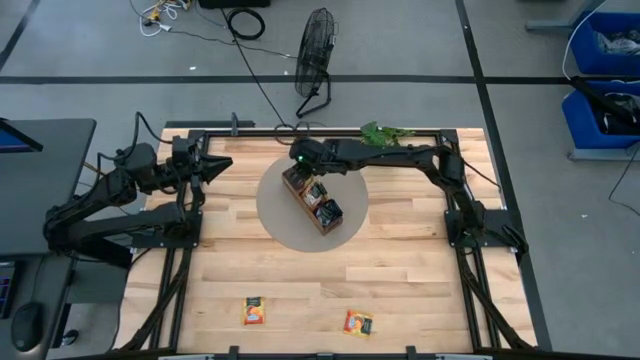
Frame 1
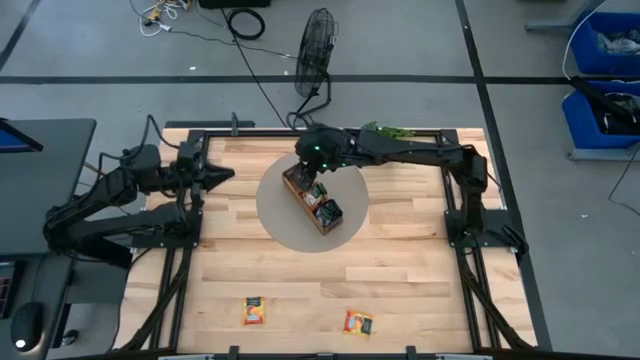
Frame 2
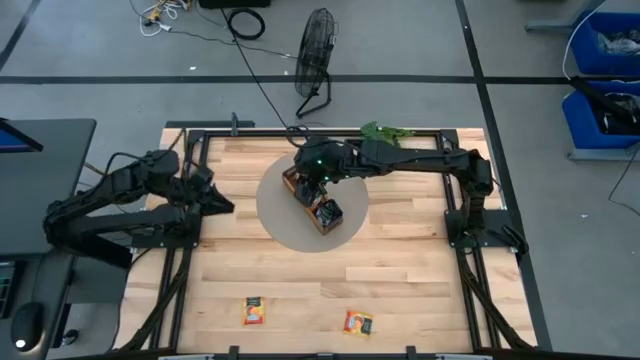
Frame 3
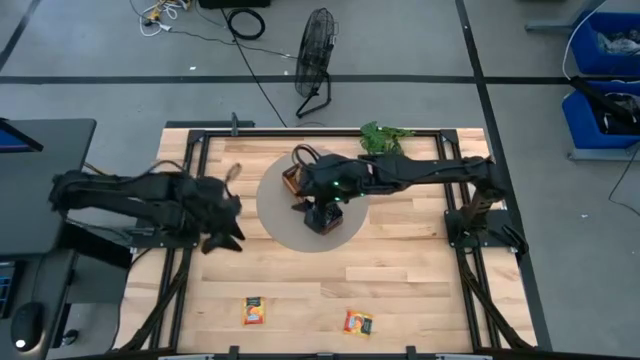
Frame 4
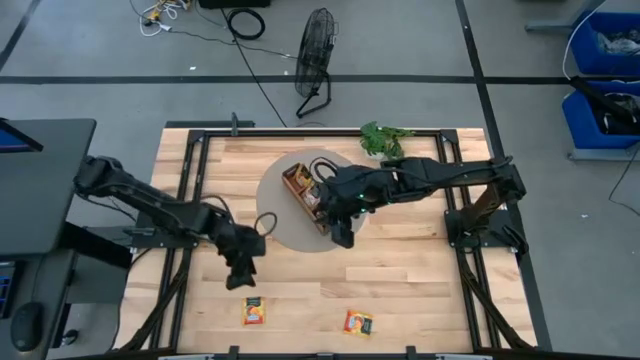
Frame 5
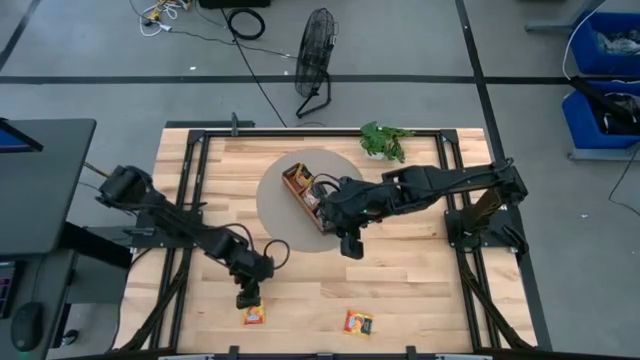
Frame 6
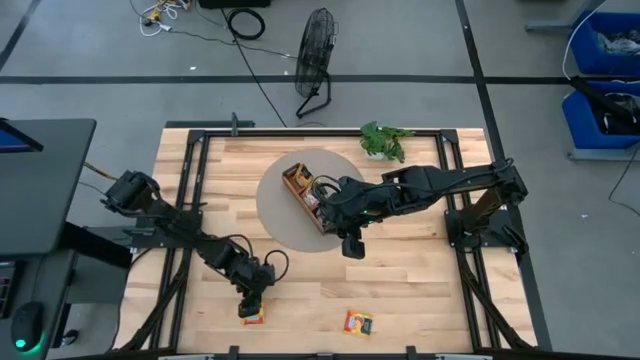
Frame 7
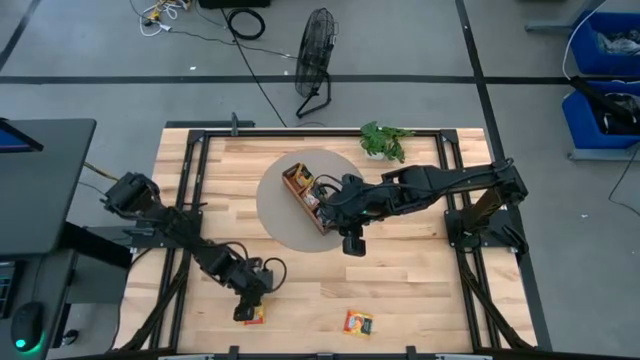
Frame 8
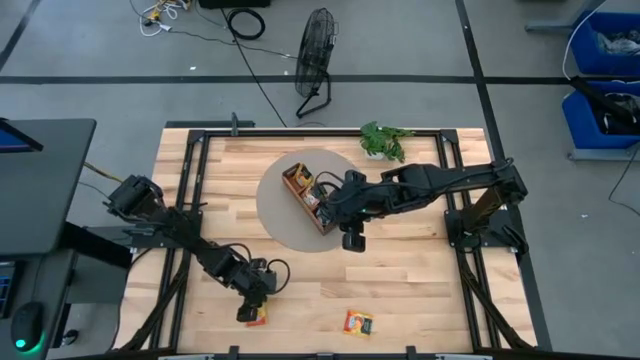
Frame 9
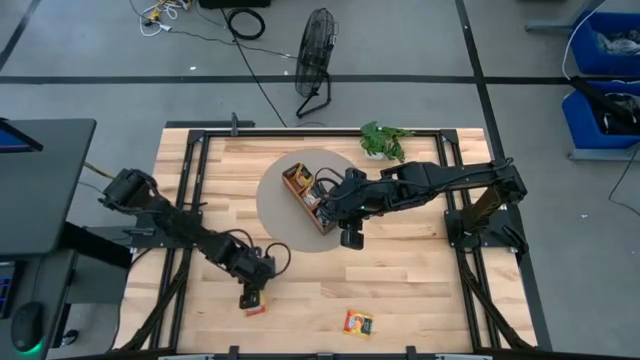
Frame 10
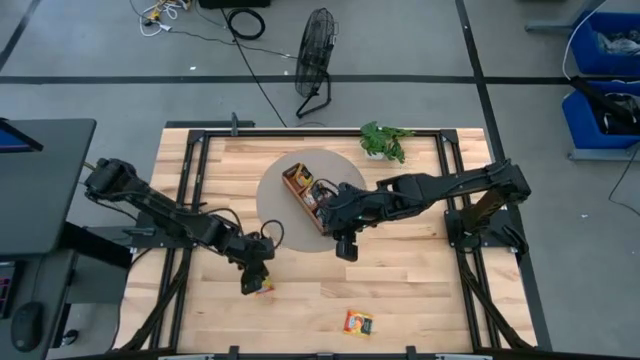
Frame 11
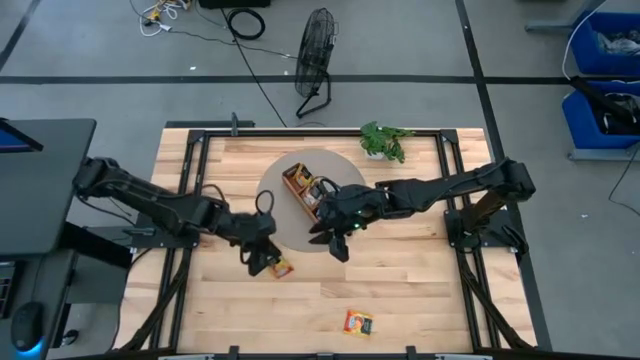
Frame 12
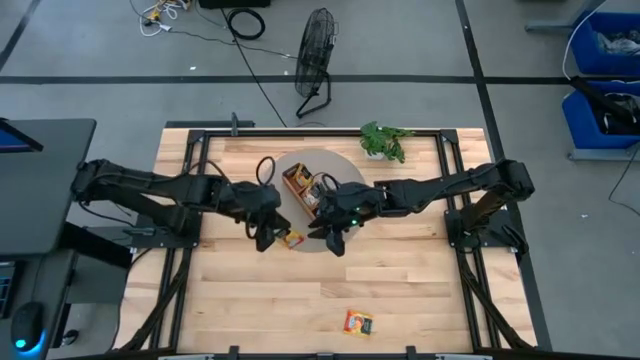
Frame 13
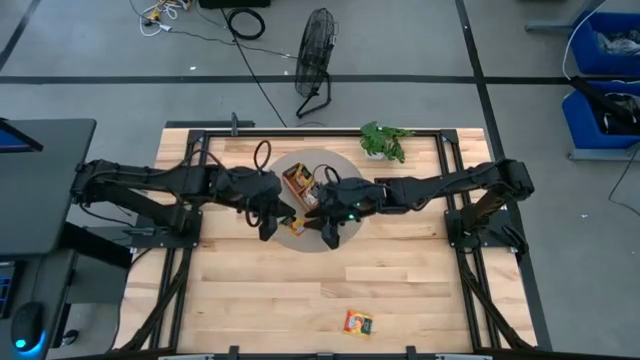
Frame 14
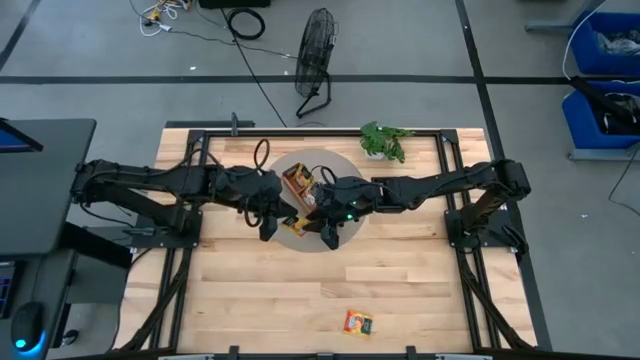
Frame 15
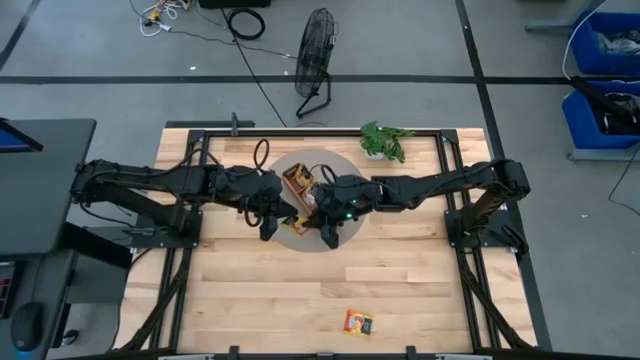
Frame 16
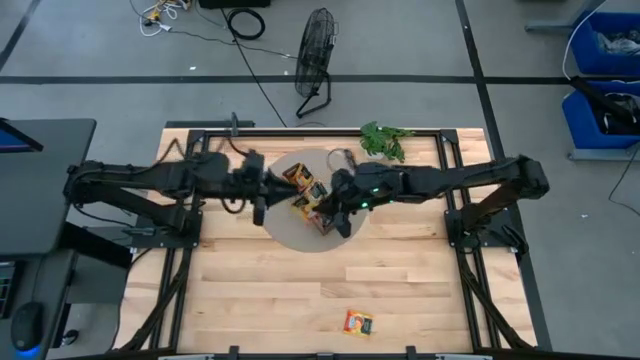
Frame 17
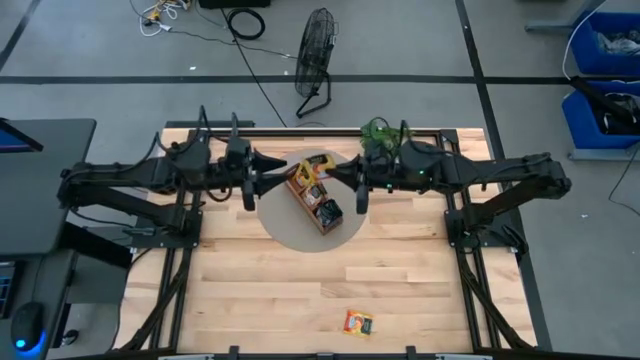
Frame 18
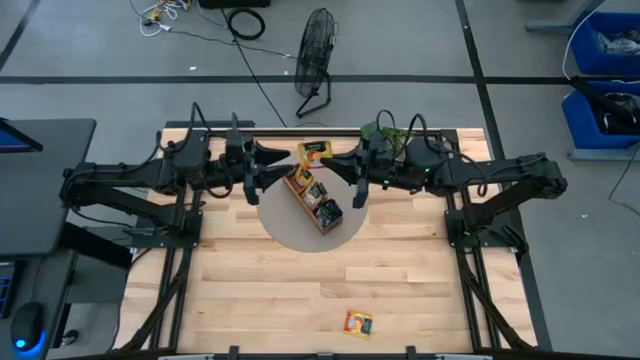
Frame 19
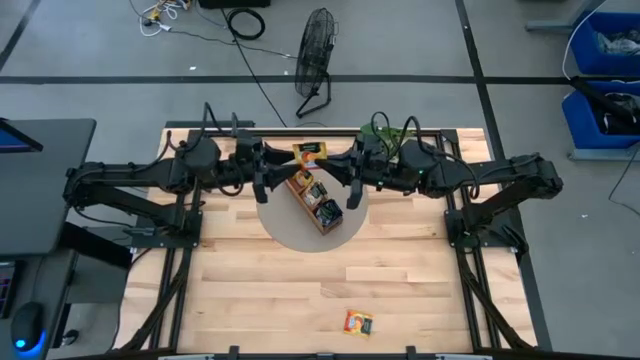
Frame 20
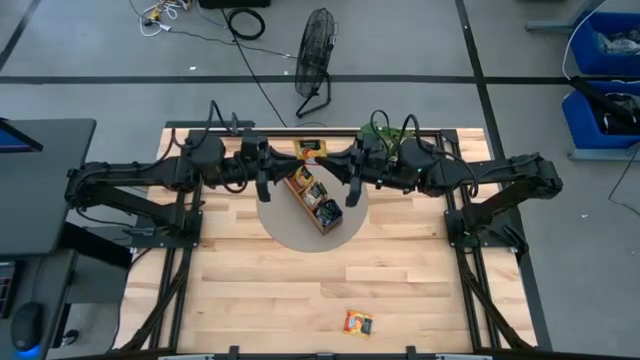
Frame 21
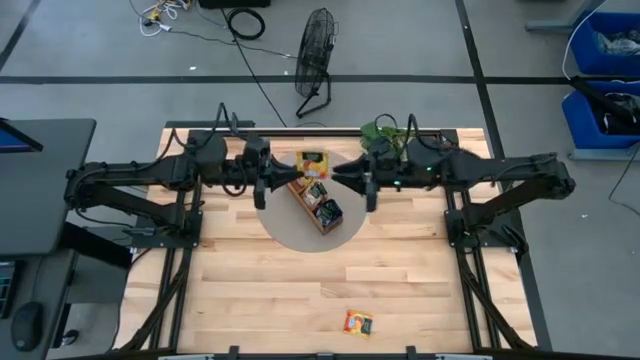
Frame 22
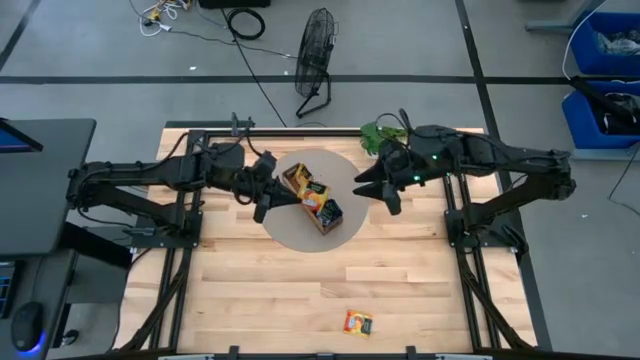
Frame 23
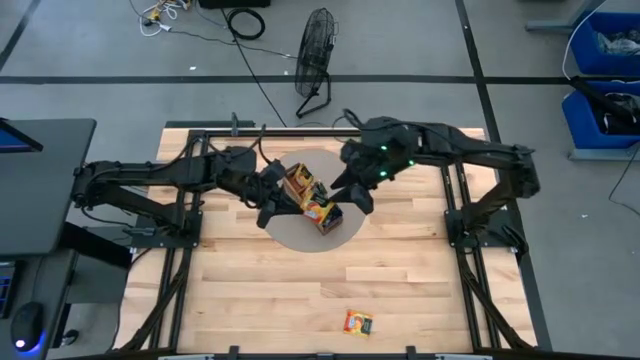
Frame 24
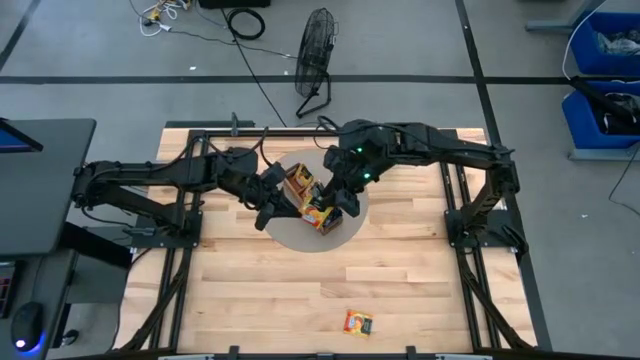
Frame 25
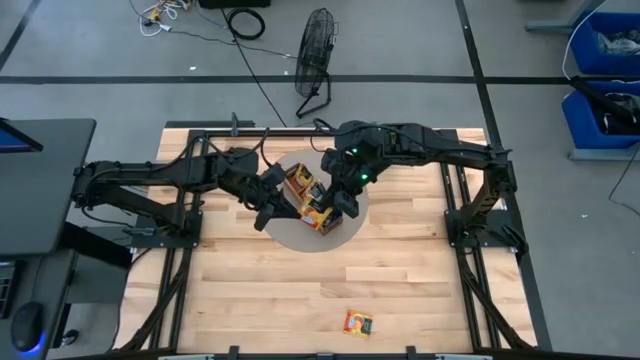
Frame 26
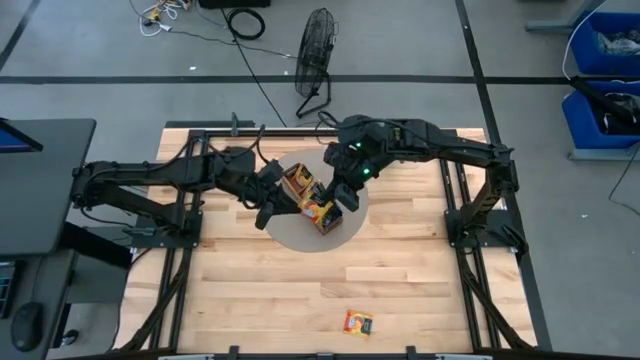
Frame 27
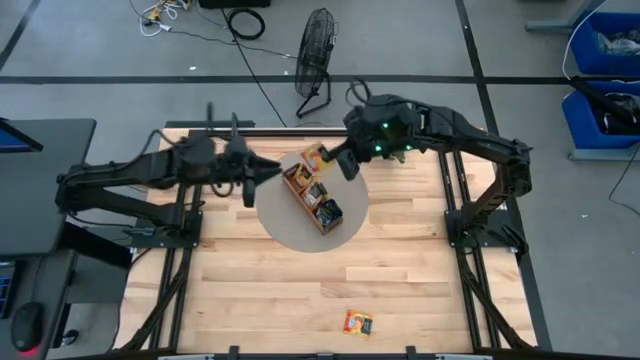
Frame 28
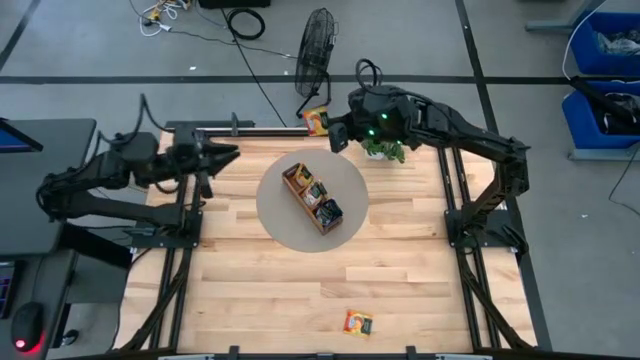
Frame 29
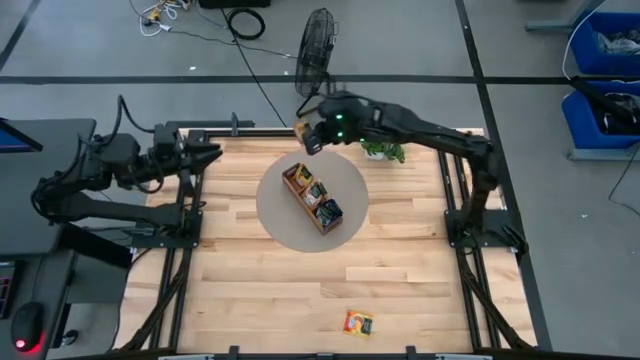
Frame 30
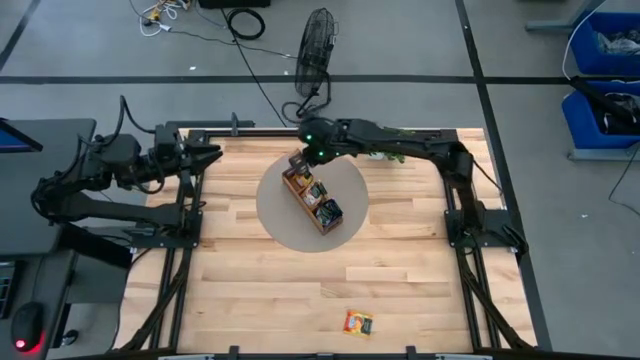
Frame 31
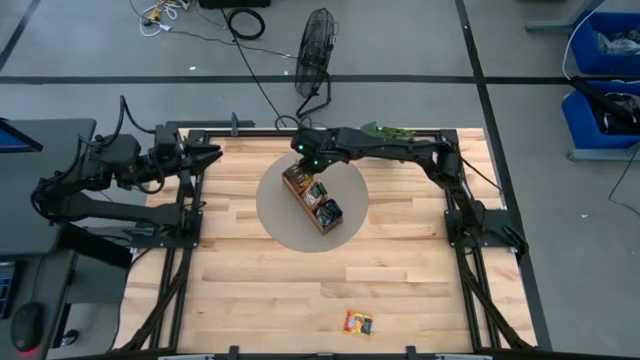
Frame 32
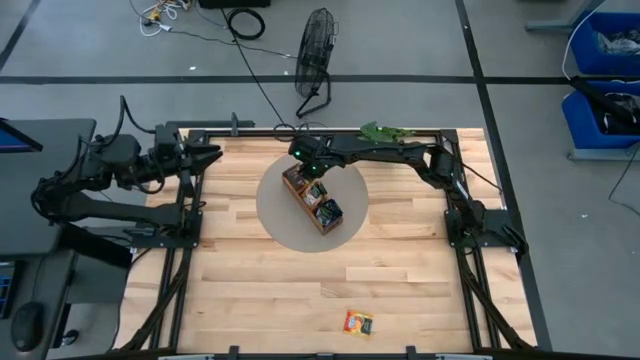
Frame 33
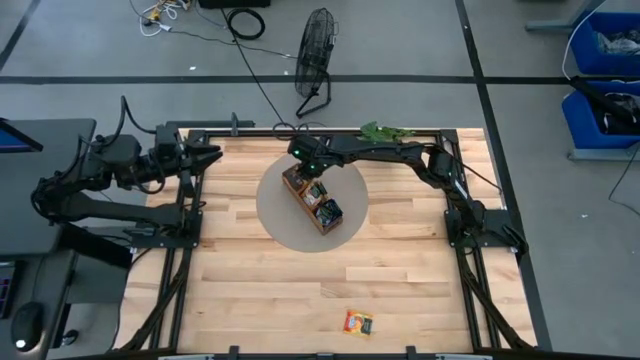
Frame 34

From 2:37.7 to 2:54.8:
Task: Pick & Place Tea
Put the yellow tea bag into the left section of the wooden organizer

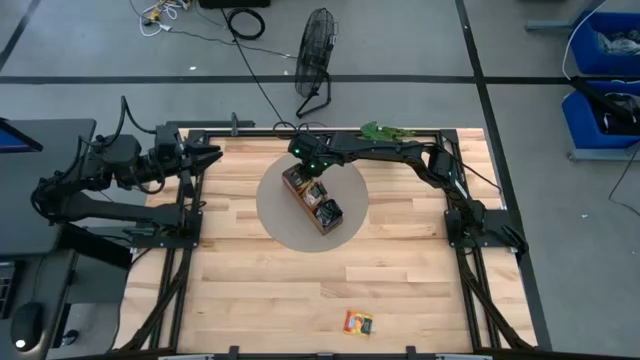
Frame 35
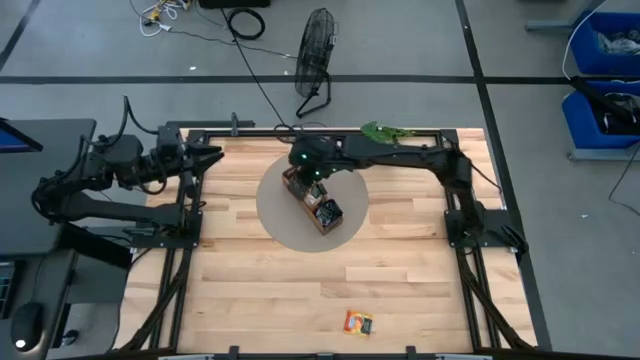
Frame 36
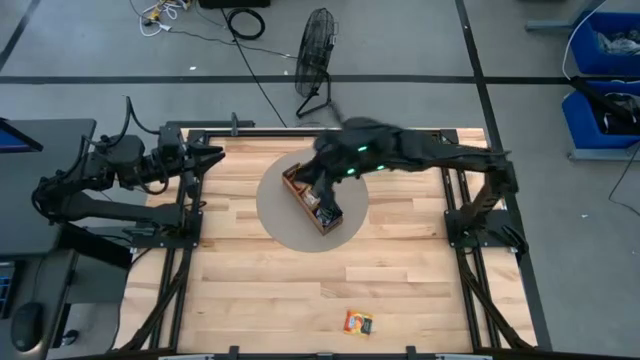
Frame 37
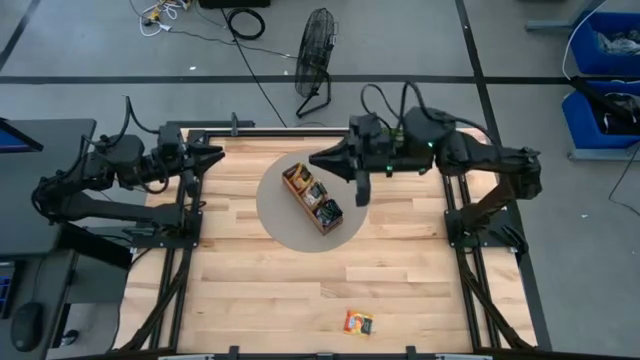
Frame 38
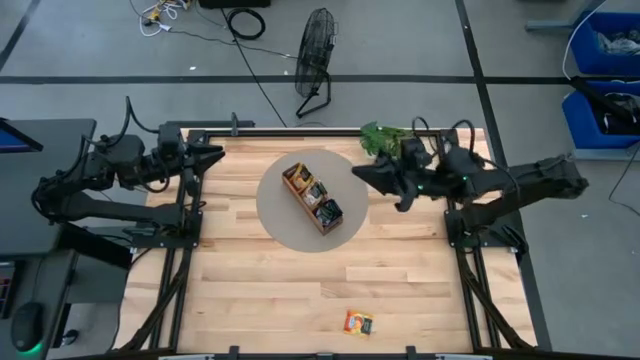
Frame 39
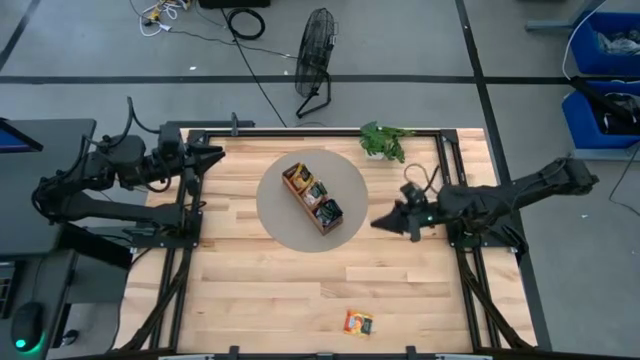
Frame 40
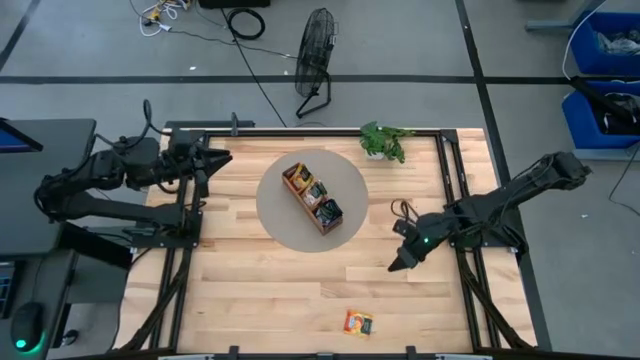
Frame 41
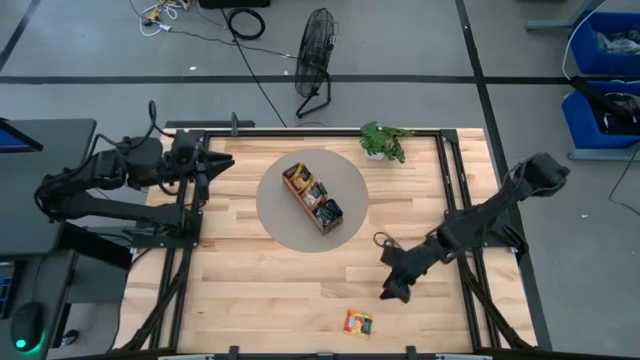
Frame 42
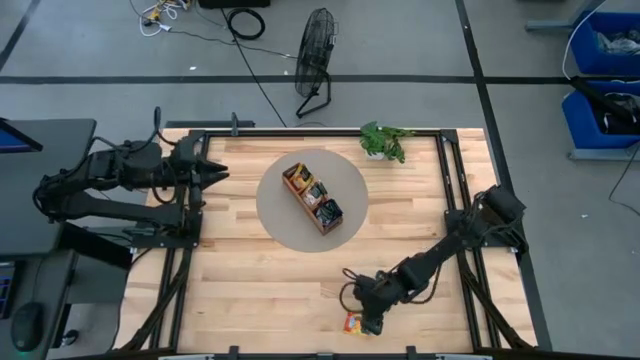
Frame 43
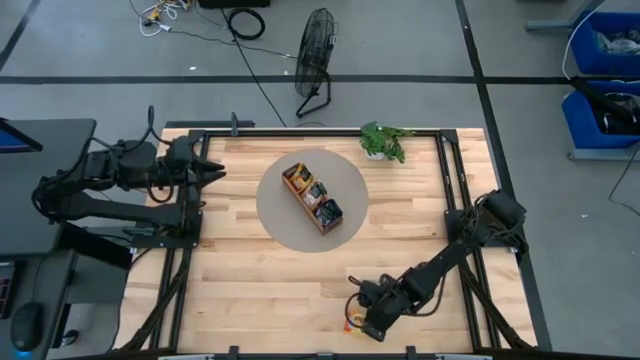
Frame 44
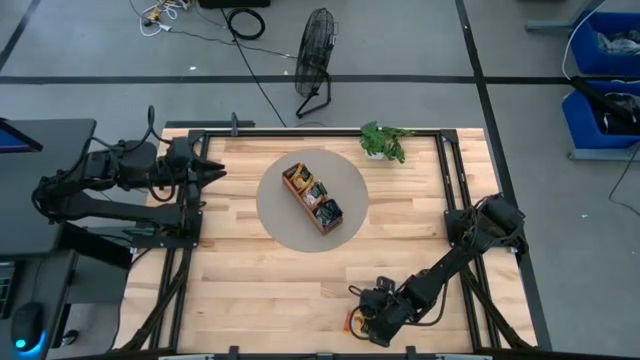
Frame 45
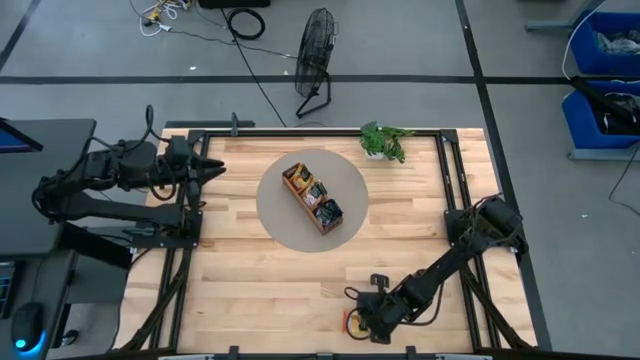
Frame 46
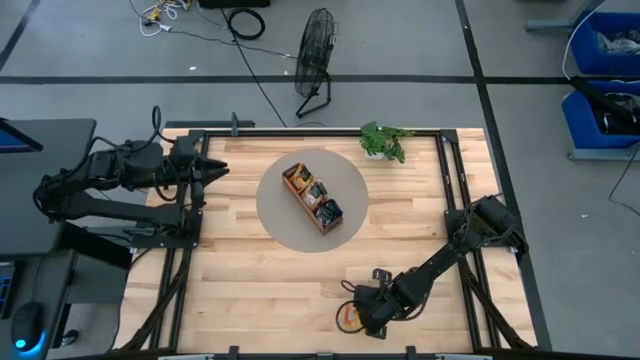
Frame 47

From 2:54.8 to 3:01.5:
Put the yellow tea bag into the left section of the wooden organizer
